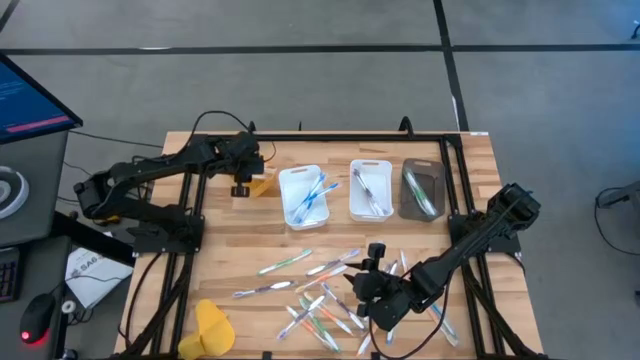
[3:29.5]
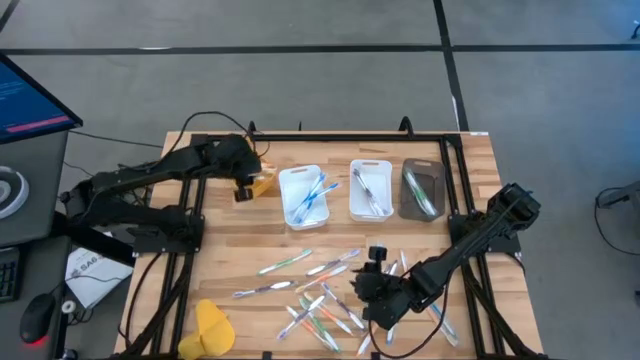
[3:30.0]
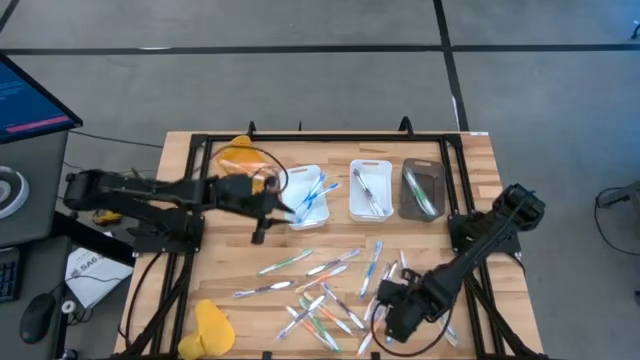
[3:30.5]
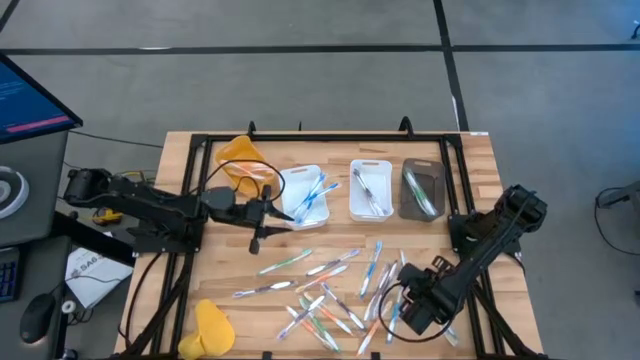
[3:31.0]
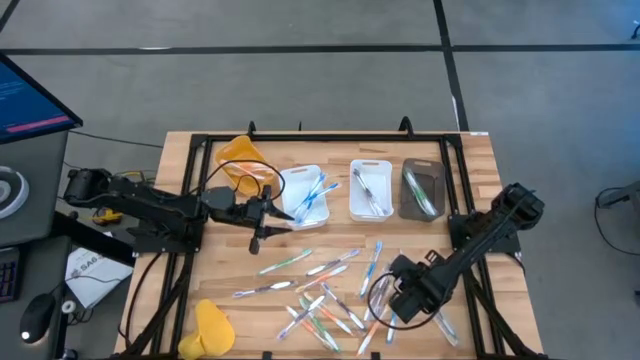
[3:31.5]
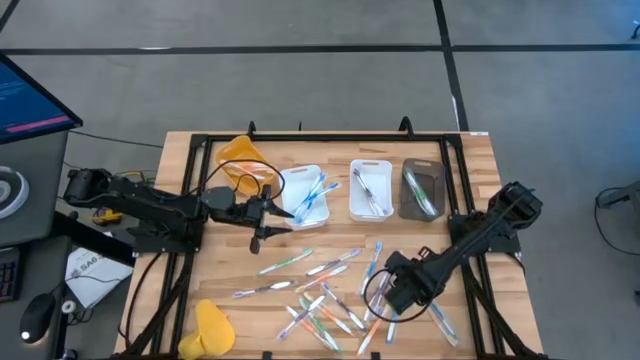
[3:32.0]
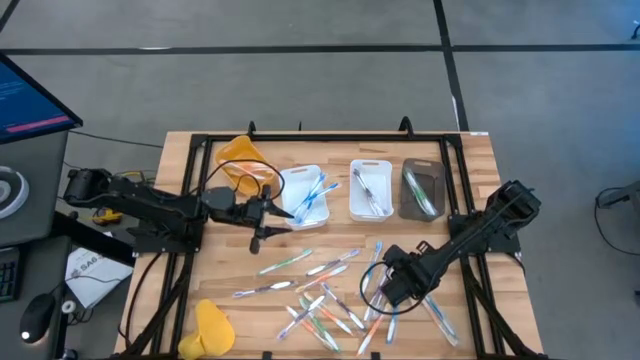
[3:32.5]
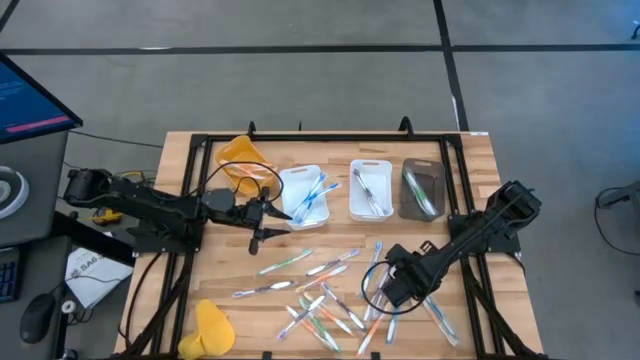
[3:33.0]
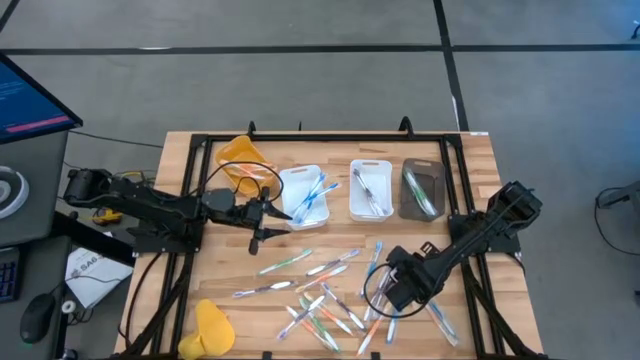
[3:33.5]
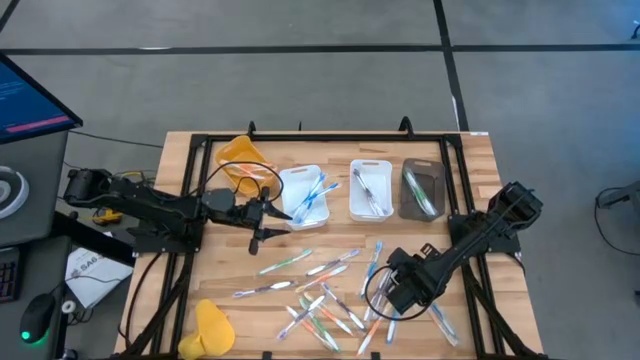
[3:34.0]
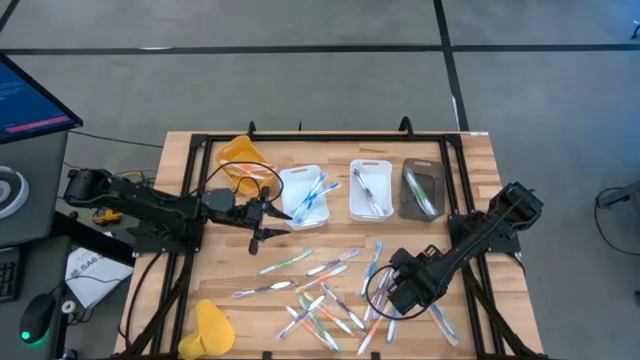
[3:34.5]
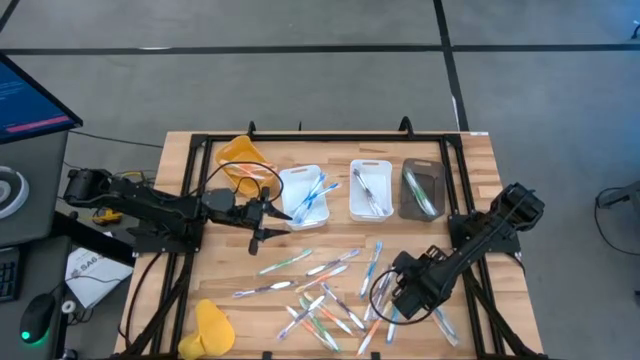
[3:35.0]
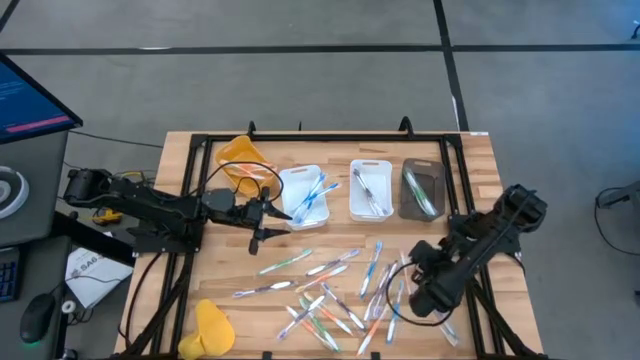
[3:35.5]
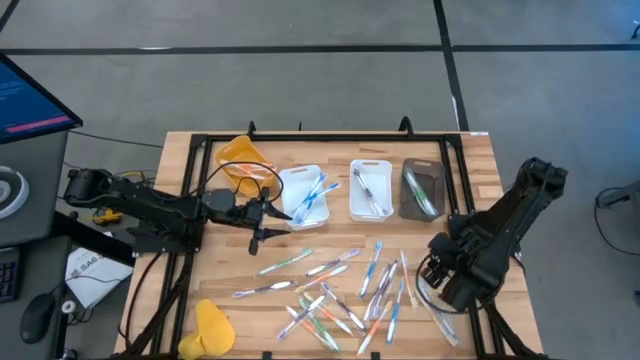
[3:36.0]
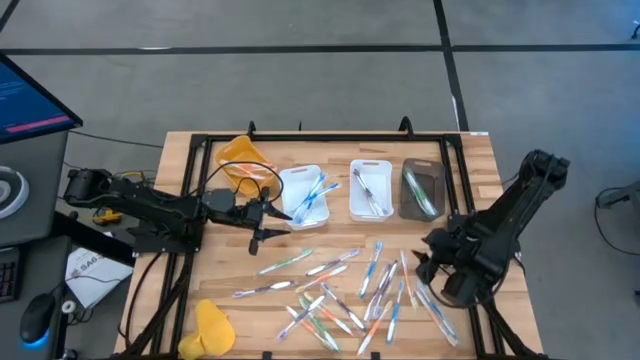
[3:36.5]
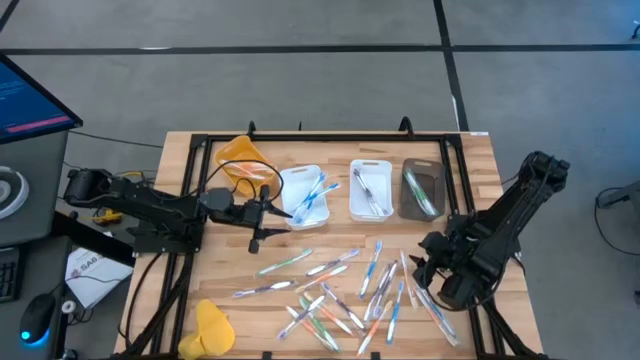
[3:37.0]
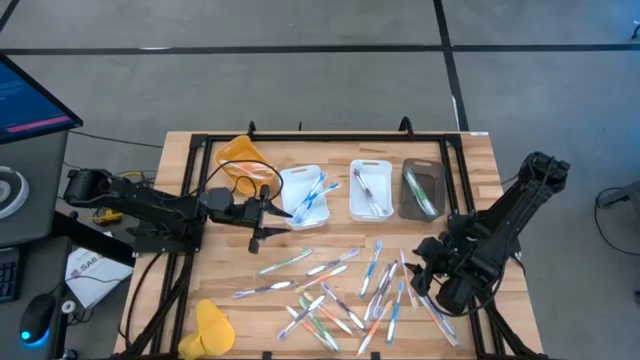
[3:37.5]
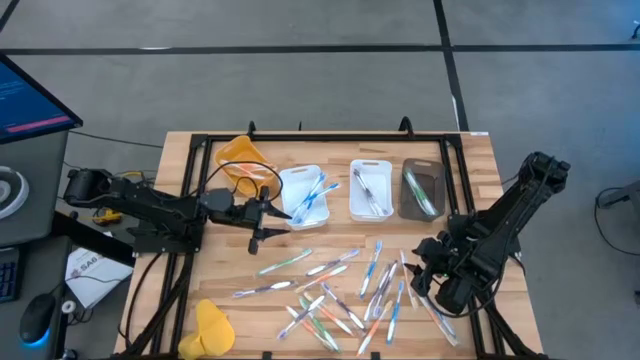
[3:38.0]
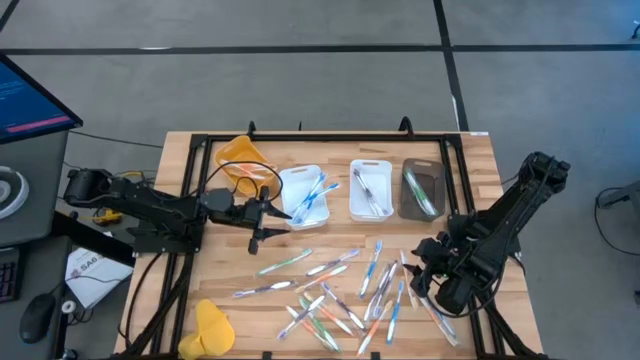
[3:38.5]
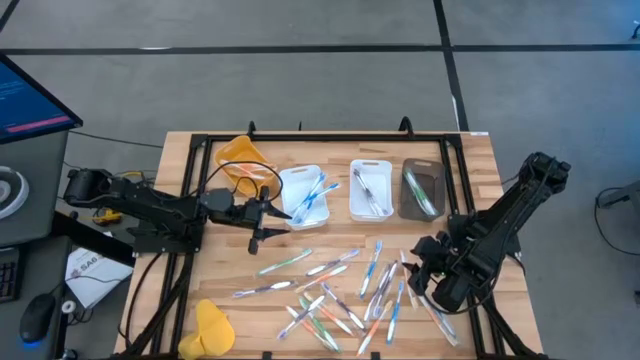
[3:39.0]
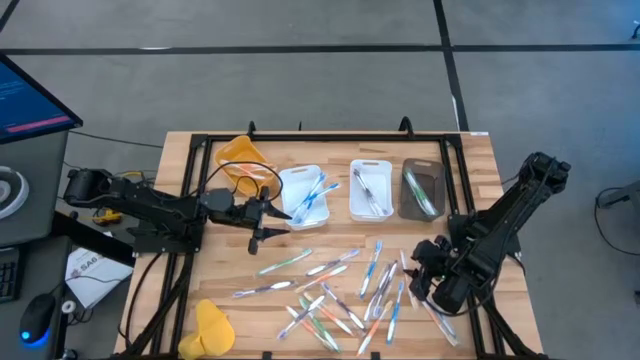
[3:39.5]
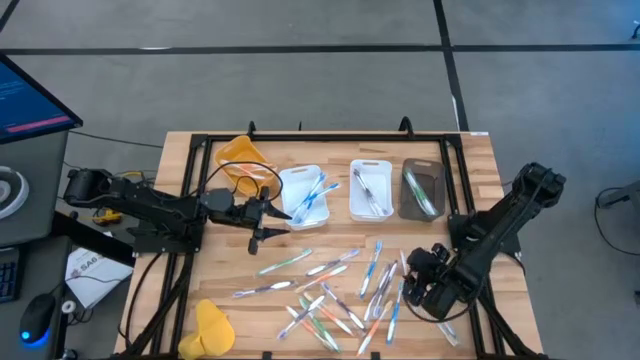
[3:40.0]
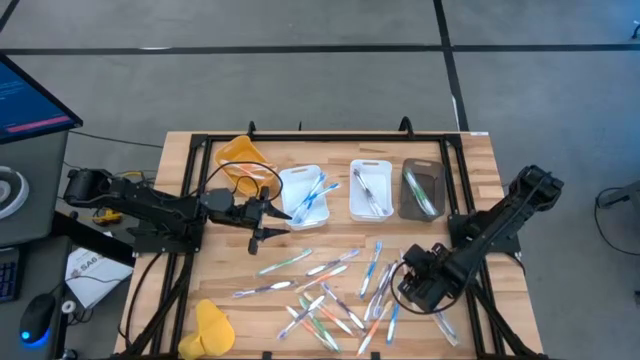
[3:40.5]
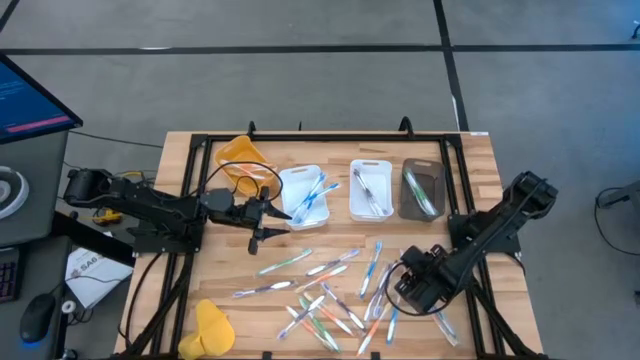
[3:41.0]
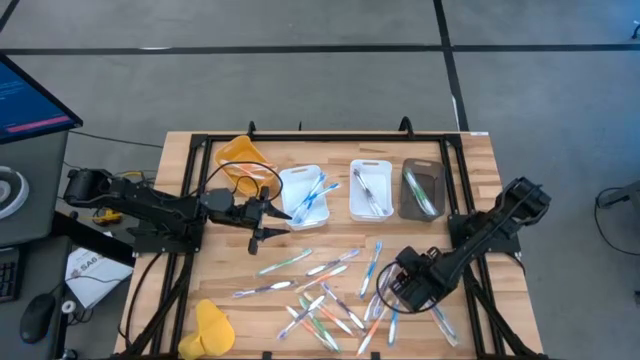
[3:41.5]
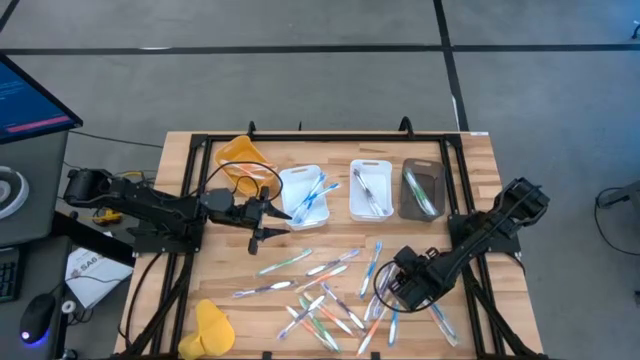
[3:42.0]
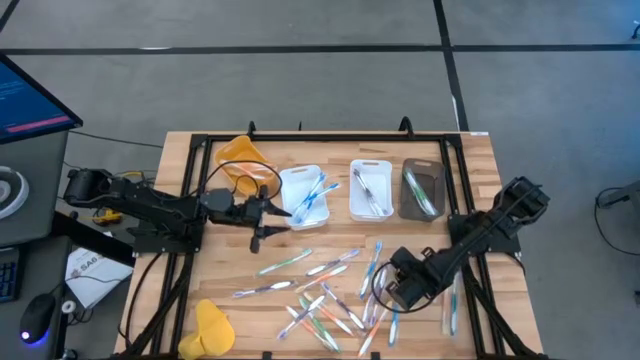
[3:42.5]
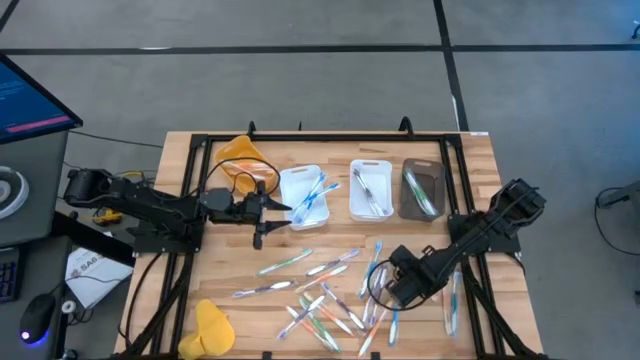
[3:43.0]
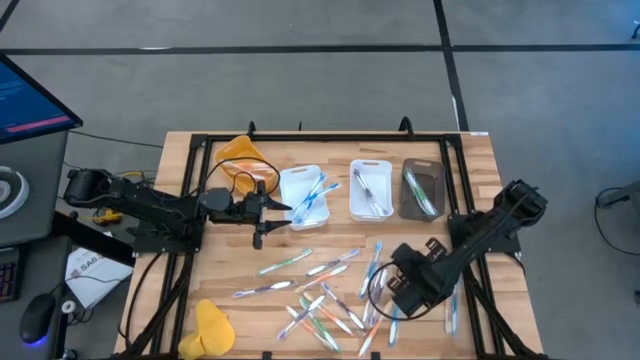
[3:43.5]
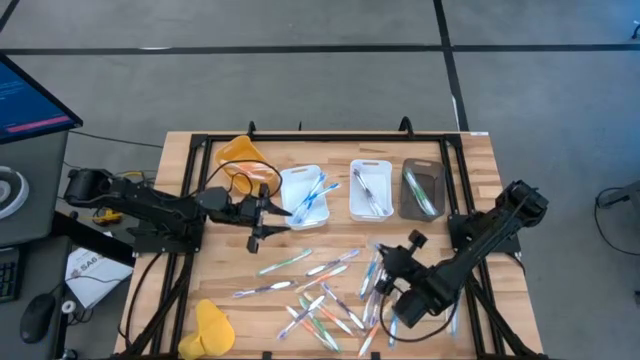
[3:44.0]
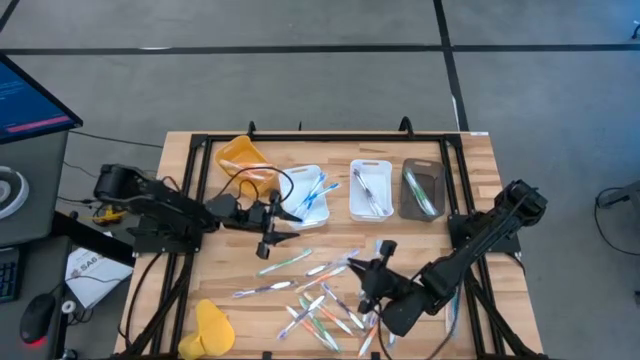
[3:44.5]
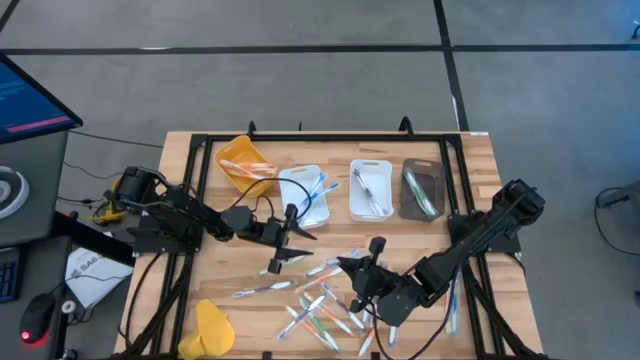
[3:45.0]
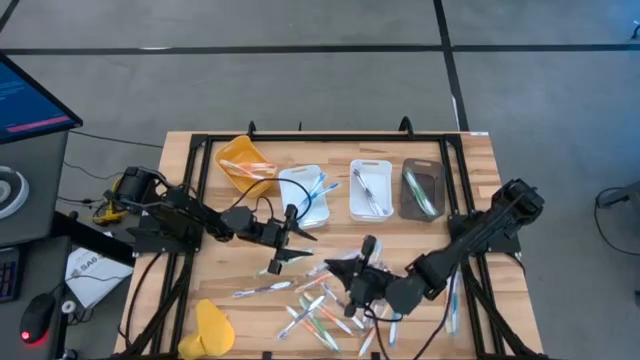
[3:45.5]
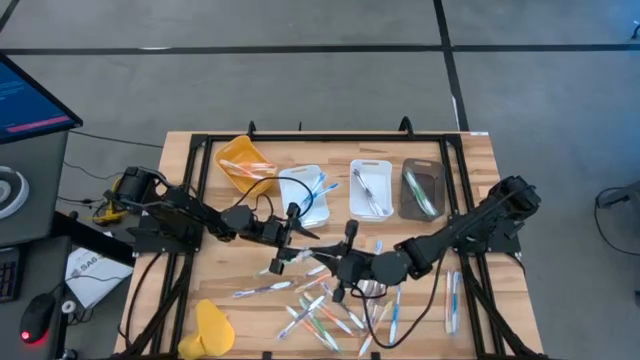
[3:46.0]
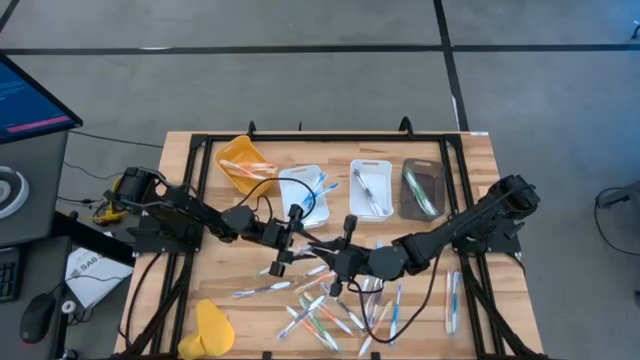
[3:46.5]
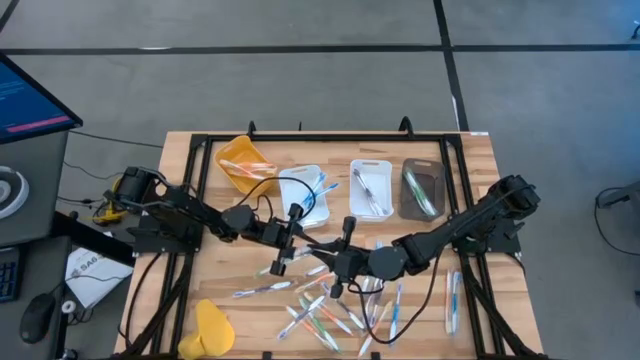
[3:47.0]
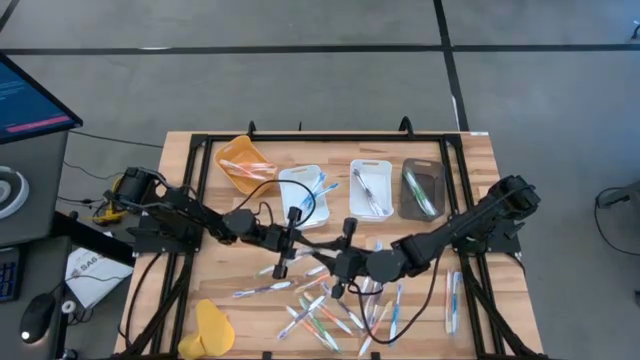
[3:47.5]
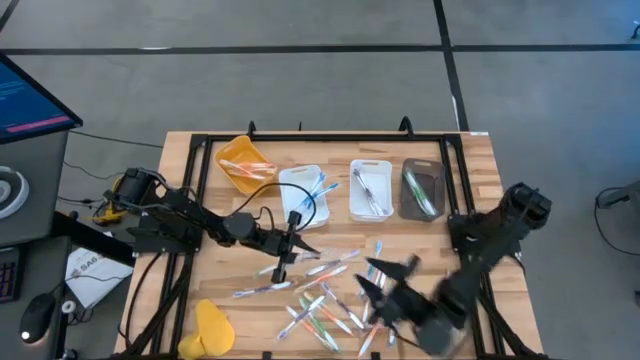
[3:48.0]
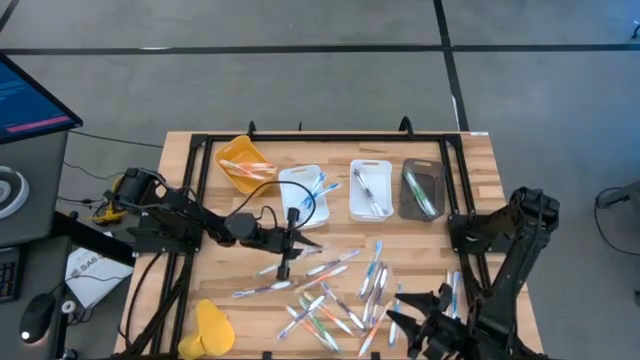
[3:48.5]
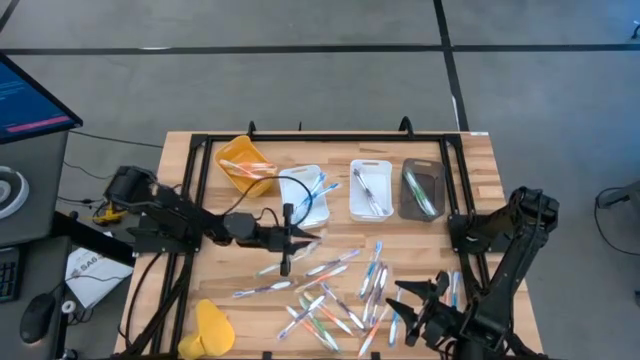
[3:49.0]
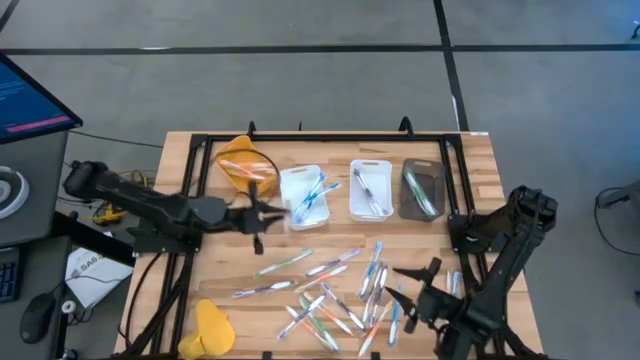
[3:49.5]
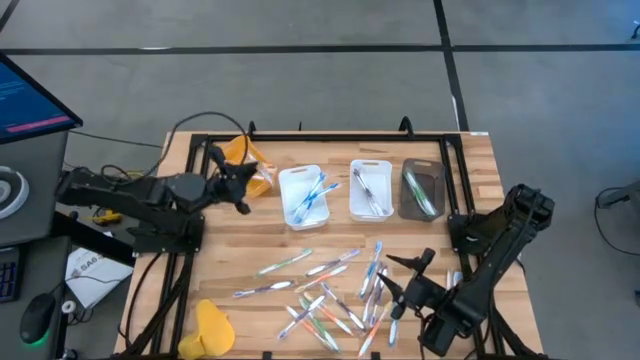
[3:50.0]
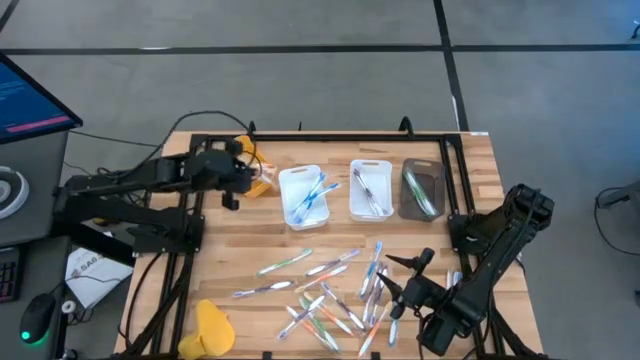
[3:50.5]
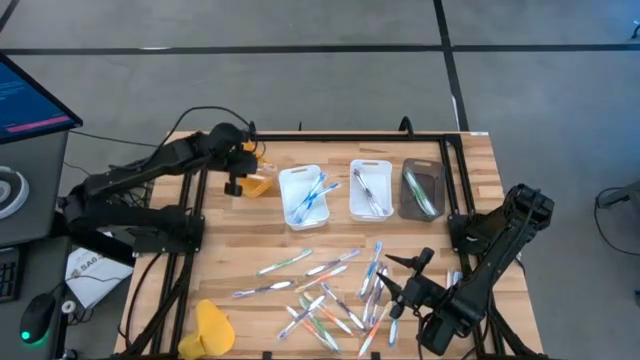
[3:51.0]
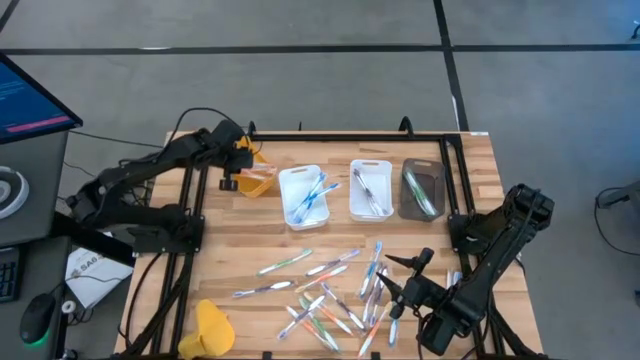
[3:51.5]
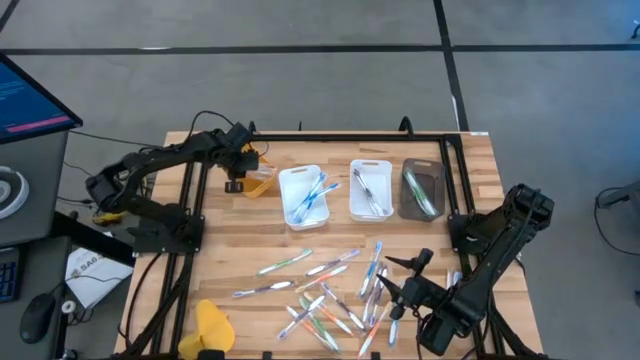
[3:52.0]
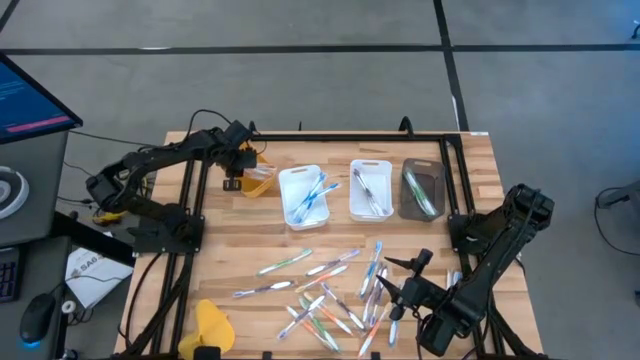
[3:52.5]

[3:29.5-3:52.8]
Task: Pick & Place Toothbrushes
Put the orange toothbrush into the orange bin
